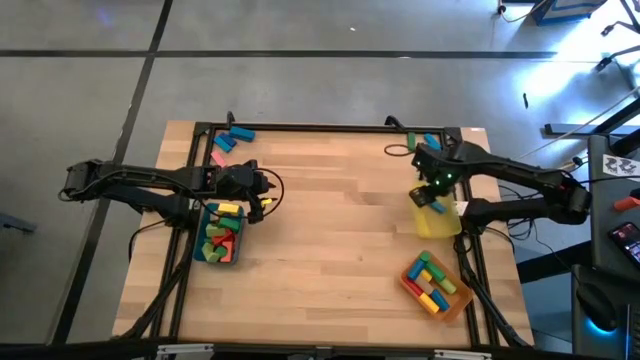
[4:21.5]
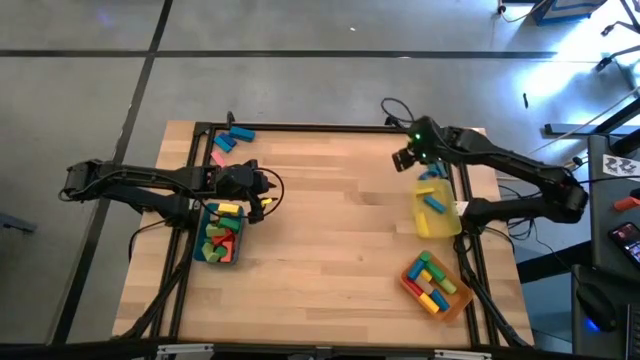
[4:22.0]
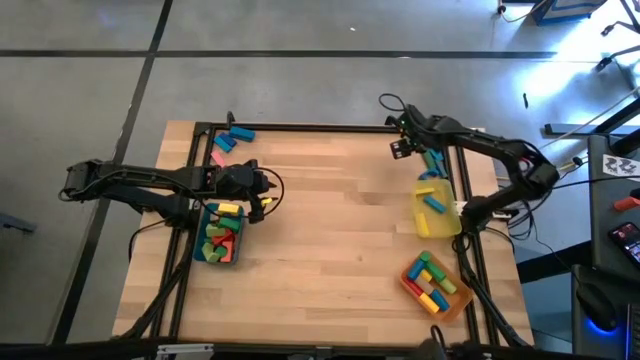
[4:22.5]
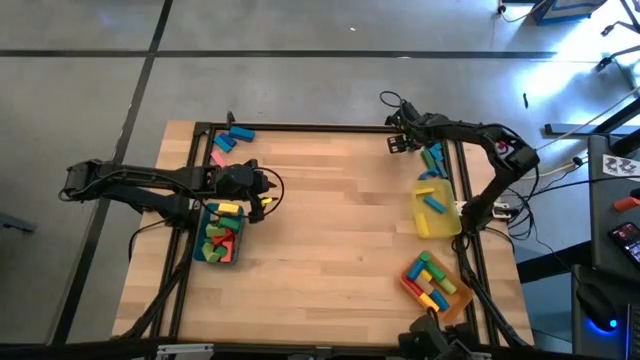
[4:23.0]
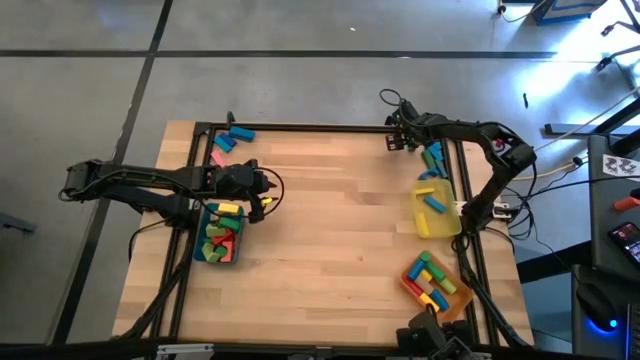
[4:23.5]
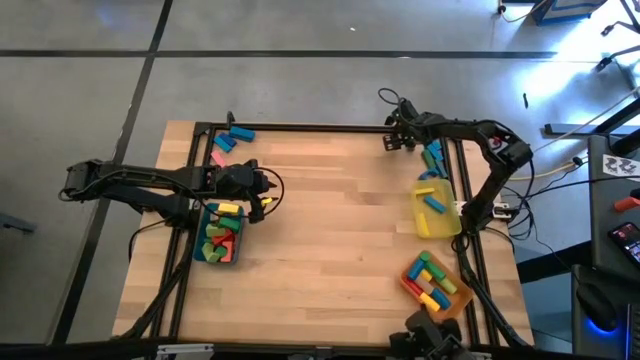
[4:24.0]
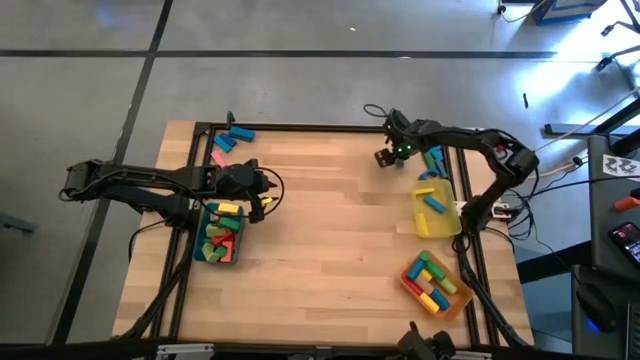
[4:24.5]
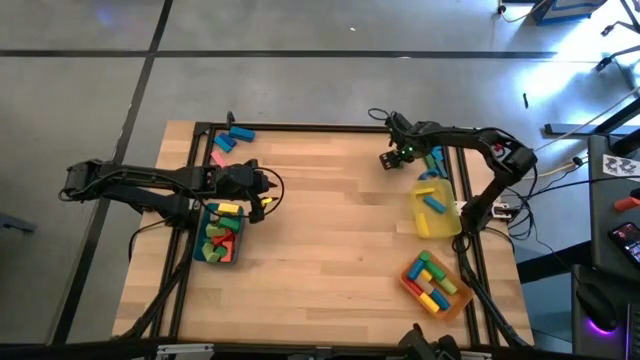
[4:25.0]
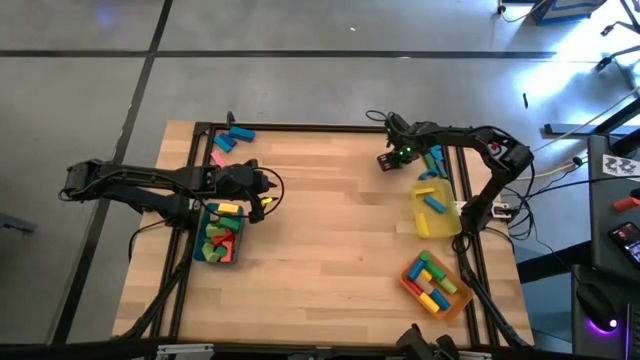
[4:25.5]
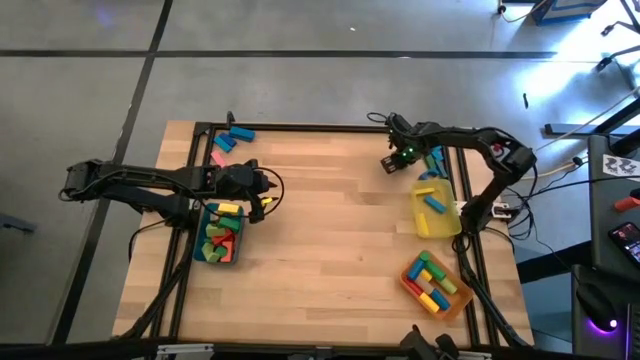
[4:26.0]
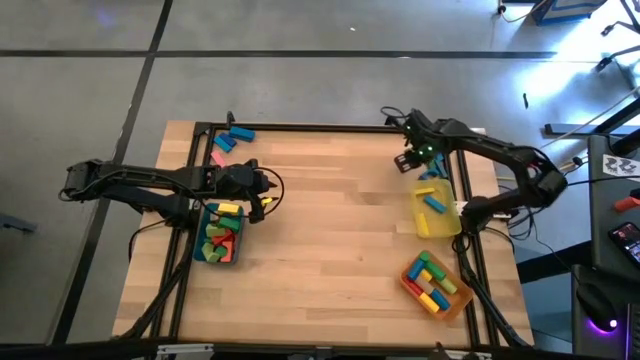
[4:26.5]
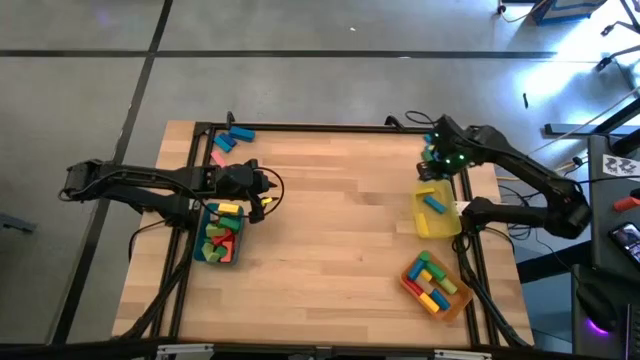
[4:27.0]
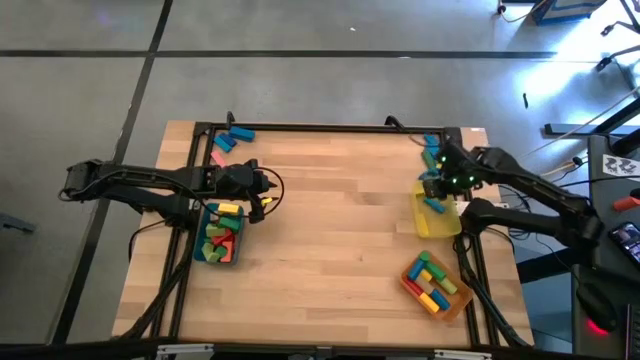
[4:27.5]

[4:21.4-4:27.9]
Task: Sort blocks by size
Put the green rectangular block into the yellow bin

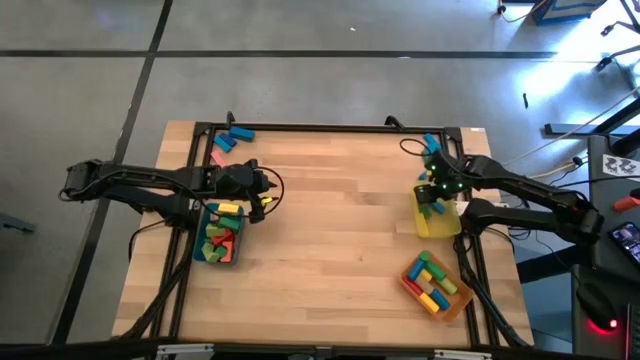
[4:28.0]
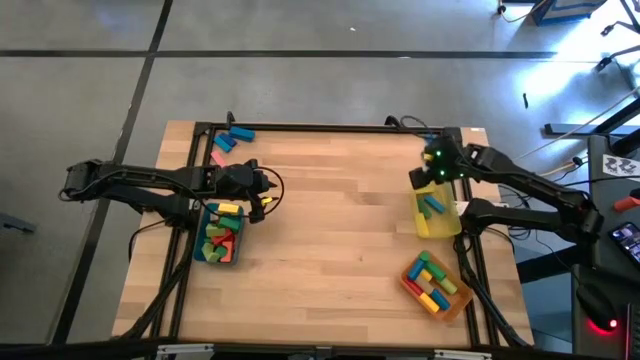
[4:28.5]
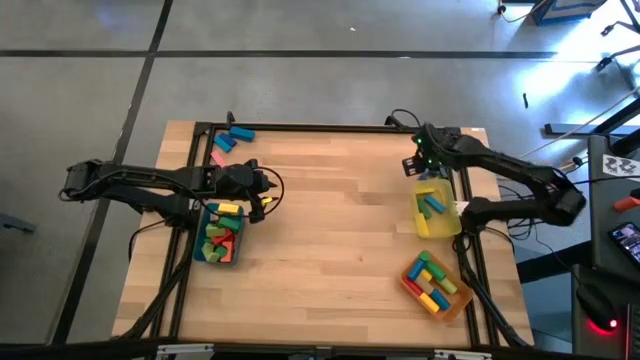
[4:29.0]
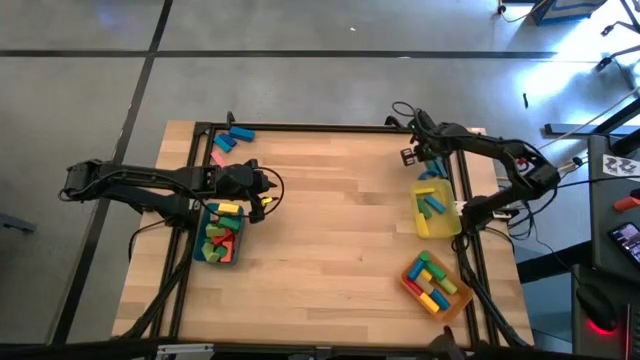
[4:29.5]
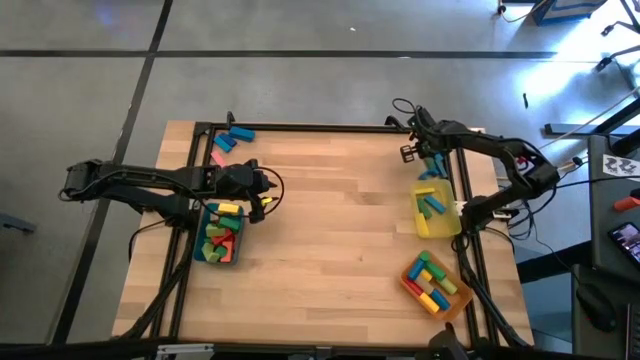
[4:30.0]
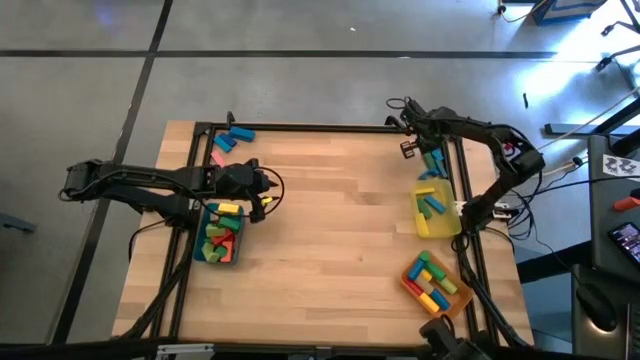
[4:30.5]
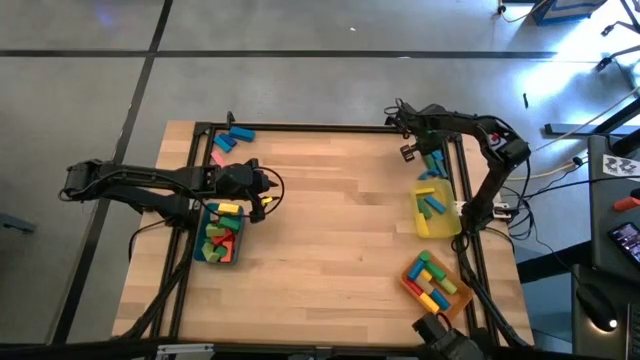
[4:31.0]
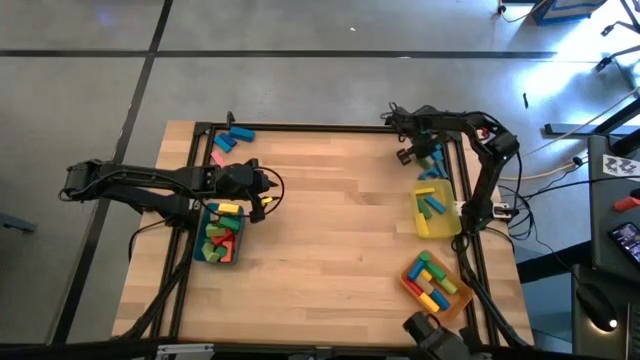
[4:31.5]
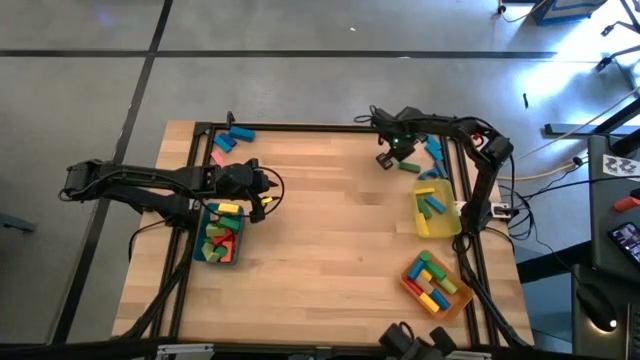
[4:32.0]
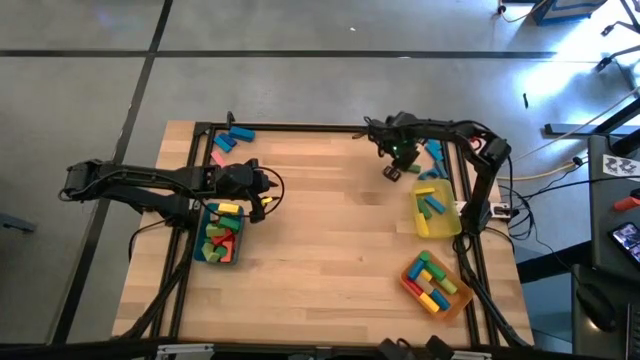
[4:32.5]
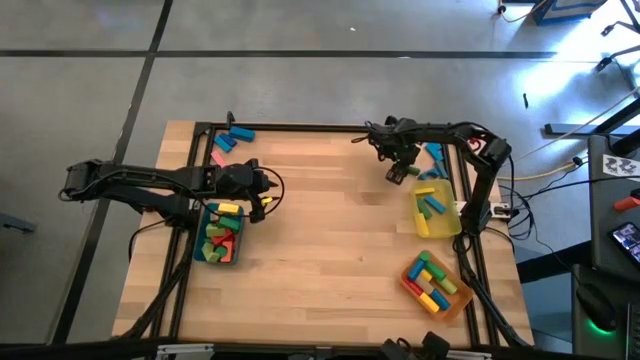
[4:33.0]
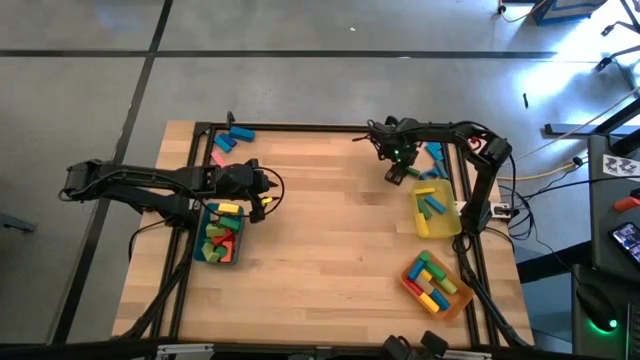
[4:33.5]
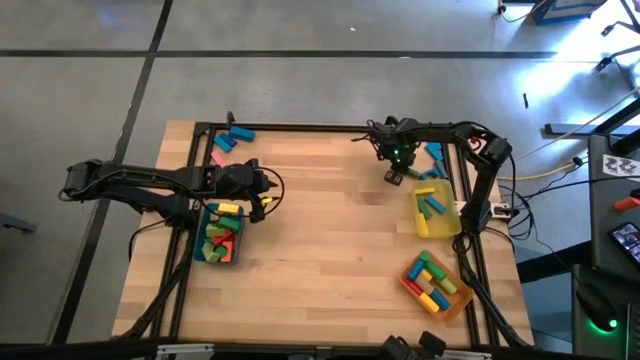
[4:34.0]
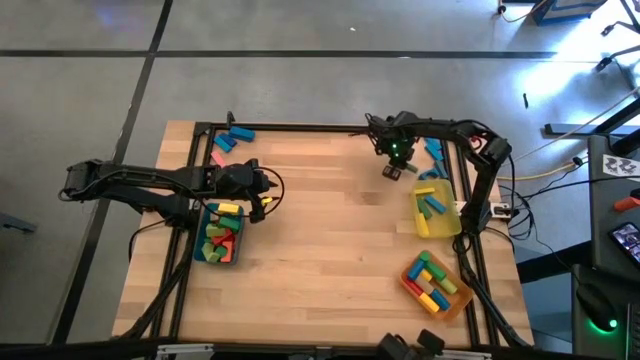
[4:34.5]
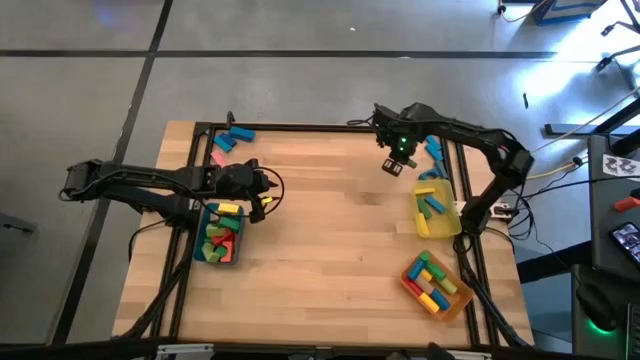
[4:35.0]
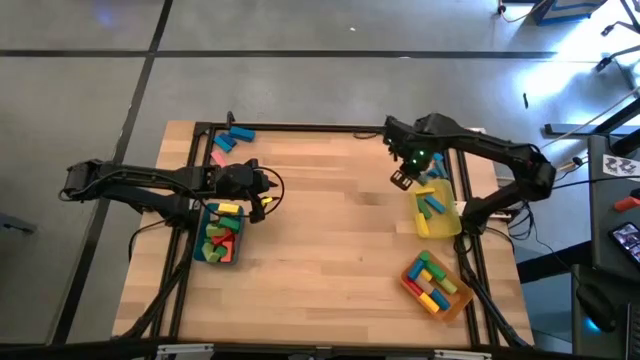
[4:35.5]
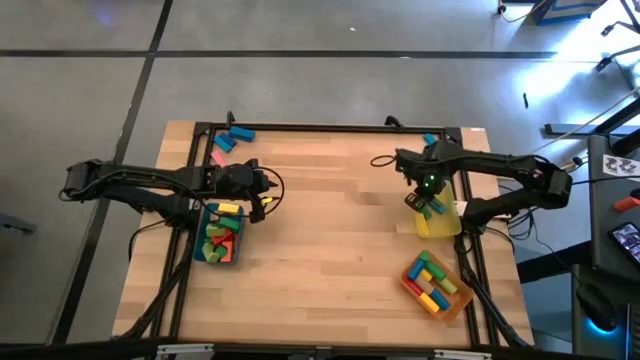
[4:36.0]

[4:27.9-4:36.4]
Put the green rectangular block into the yellow bin

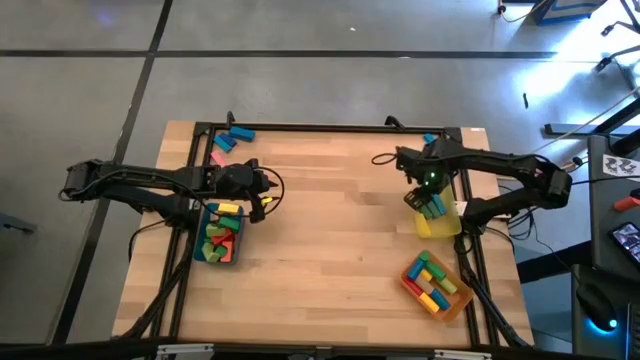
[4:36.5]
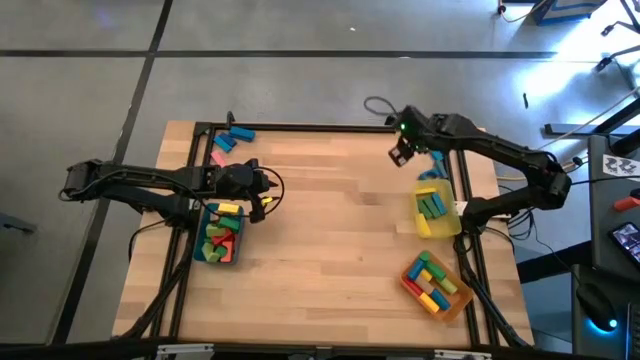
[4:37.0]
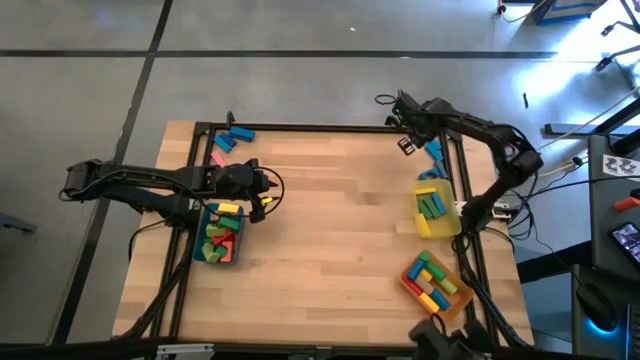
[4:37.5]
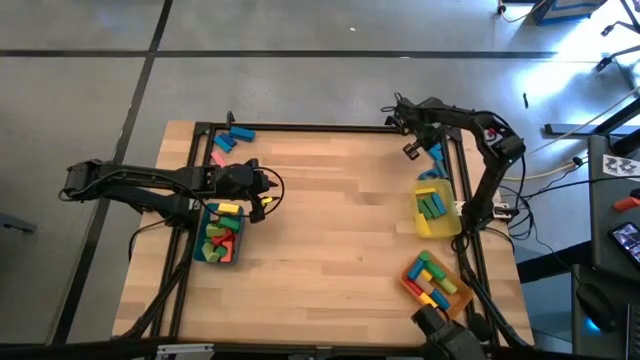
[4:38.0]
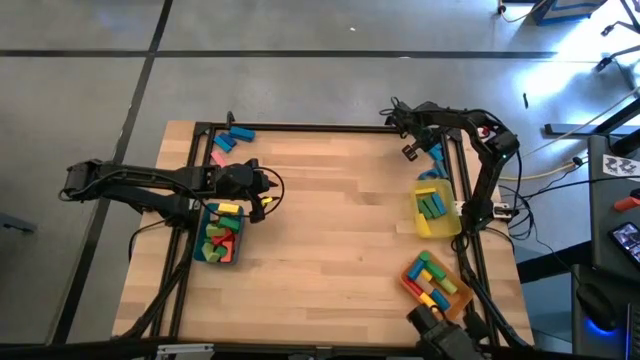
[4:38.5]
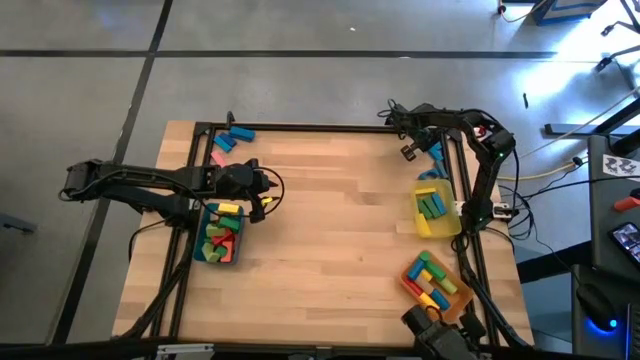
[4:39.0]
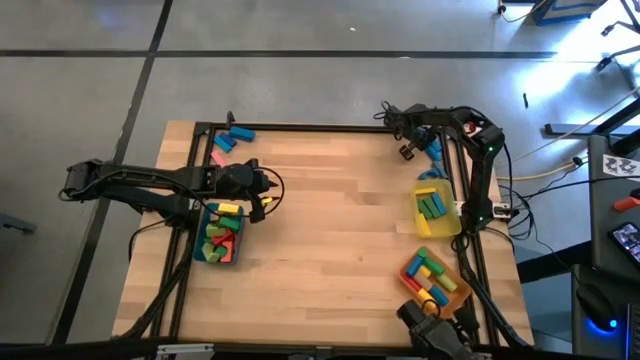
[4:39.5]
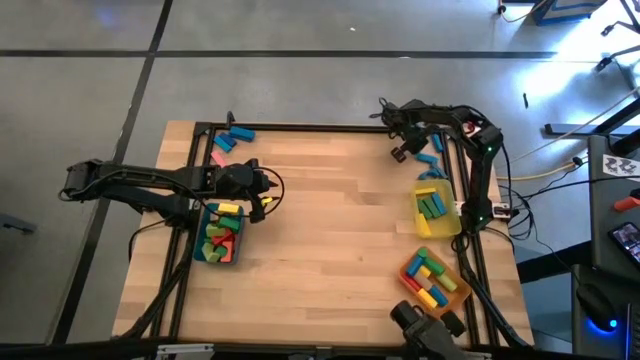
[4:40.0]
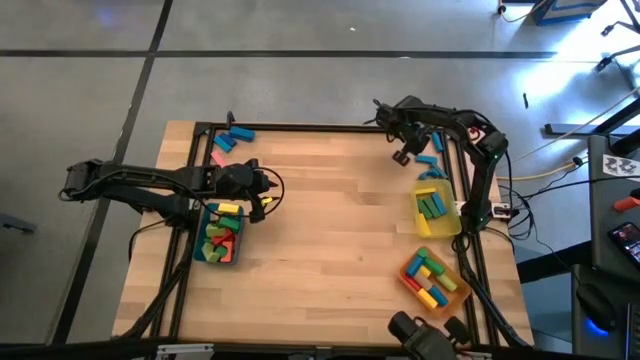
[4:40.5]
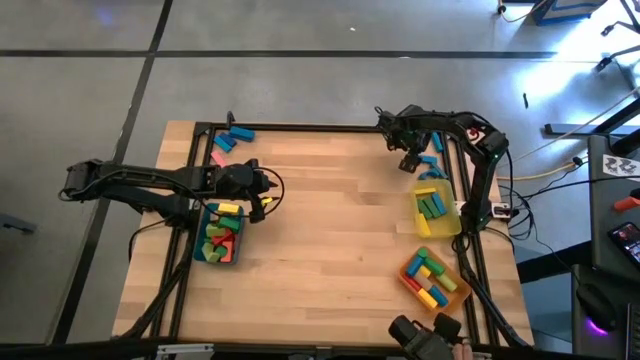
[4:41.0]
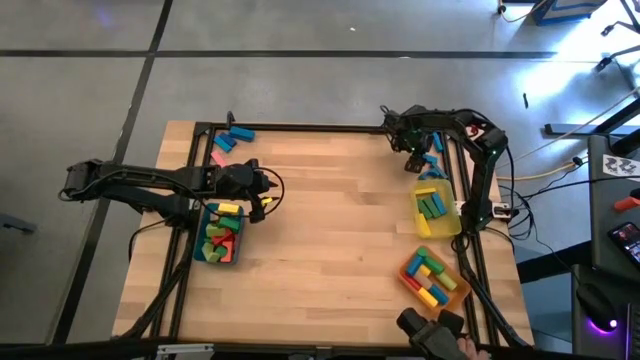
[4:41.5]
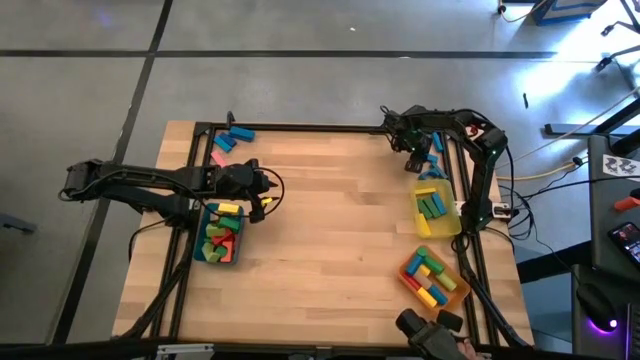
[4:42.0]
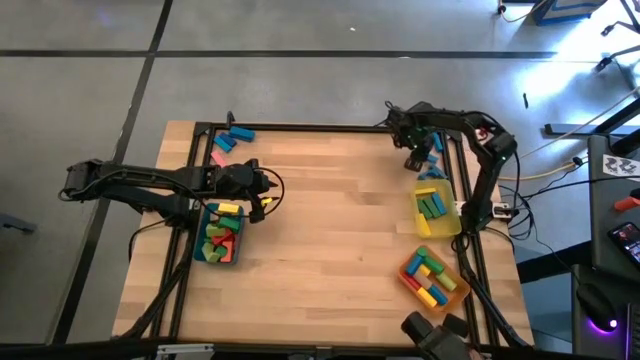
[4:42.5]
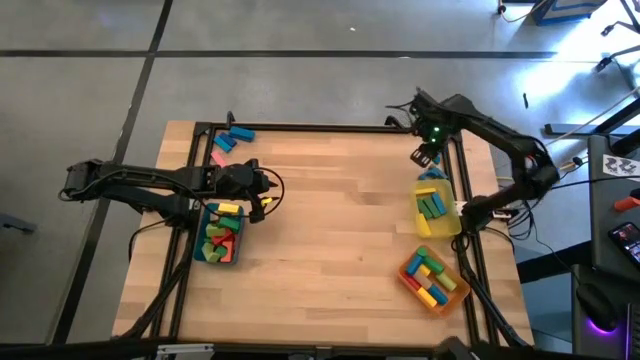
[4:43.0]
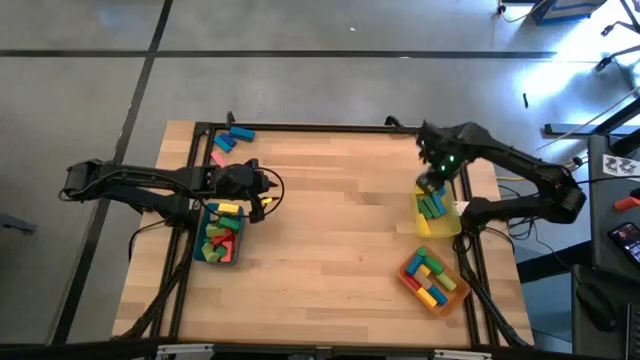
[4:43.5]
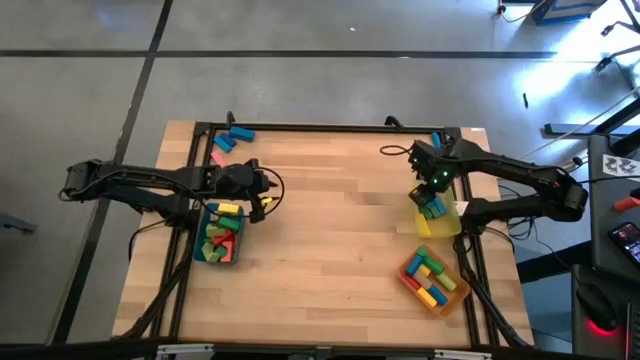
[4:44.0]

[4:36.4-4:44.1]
Put the blue rectangular block into the yellow bin
